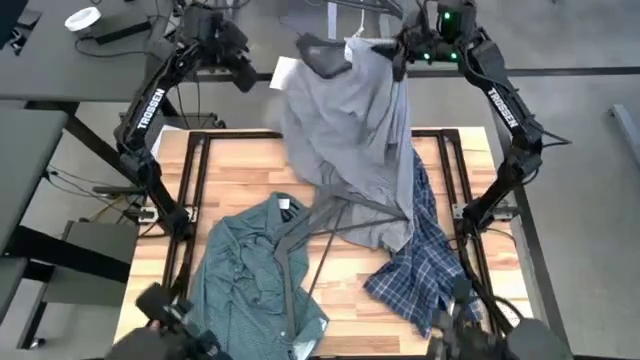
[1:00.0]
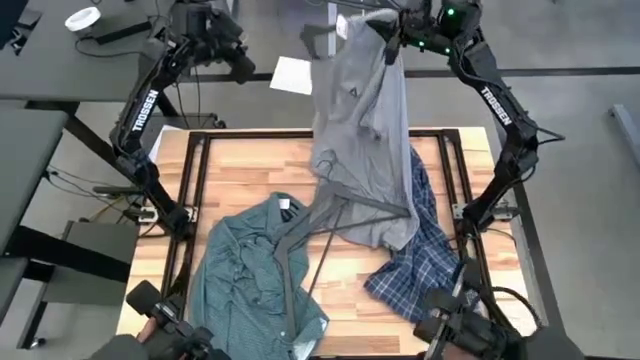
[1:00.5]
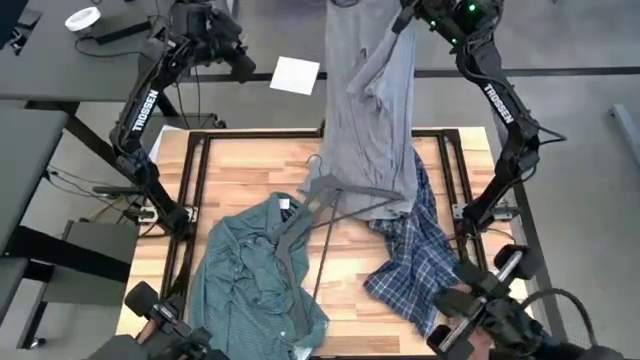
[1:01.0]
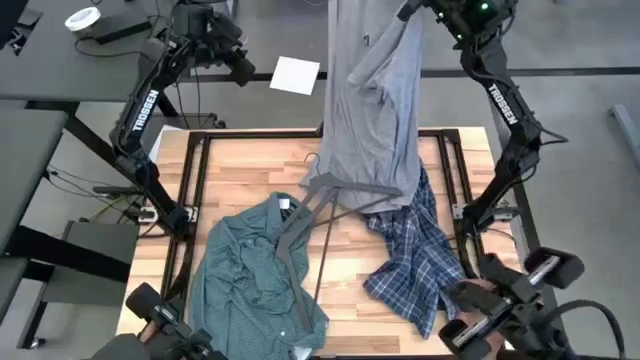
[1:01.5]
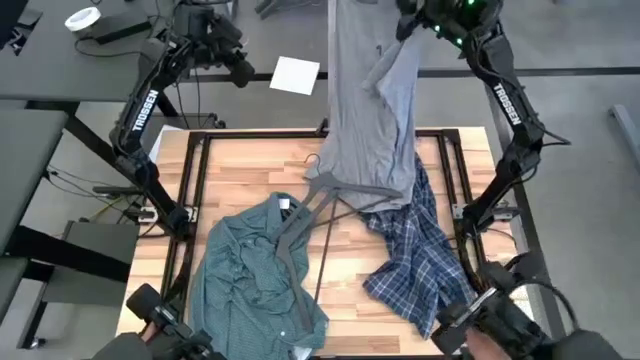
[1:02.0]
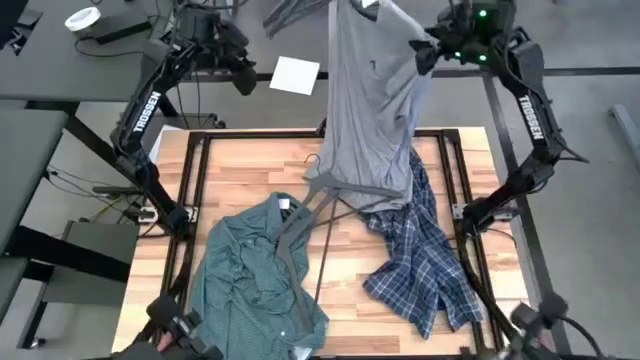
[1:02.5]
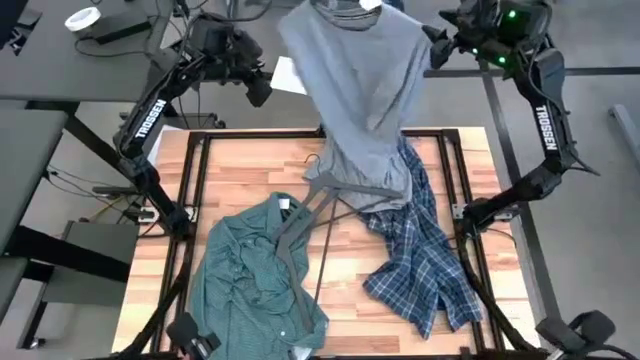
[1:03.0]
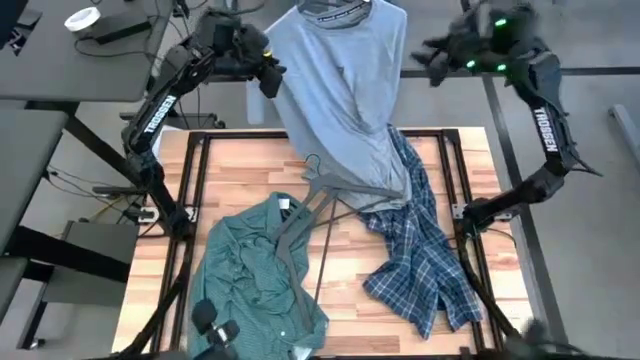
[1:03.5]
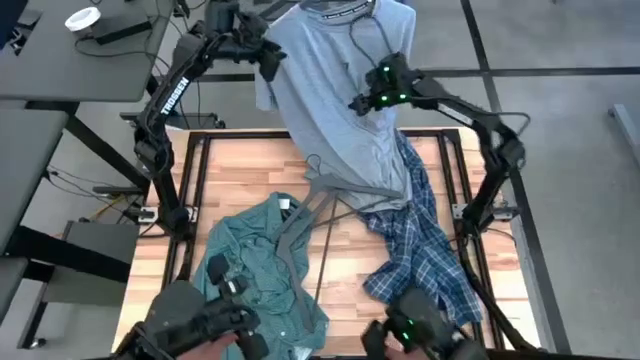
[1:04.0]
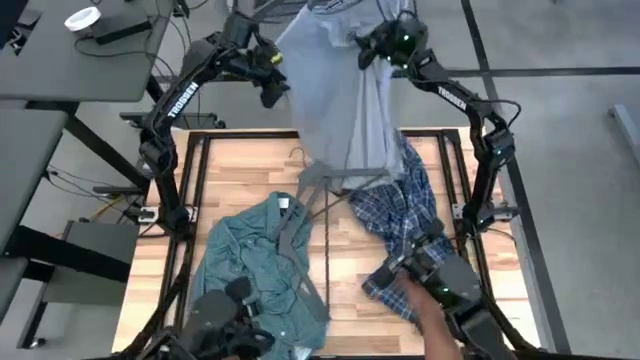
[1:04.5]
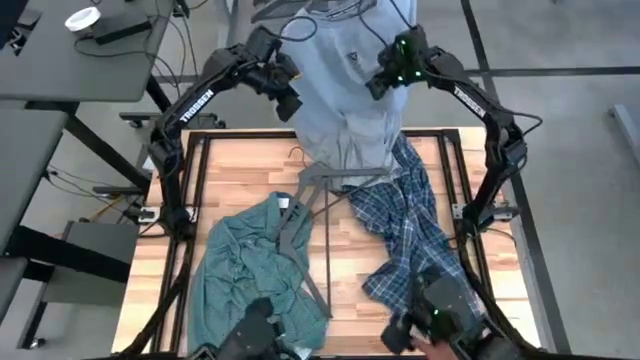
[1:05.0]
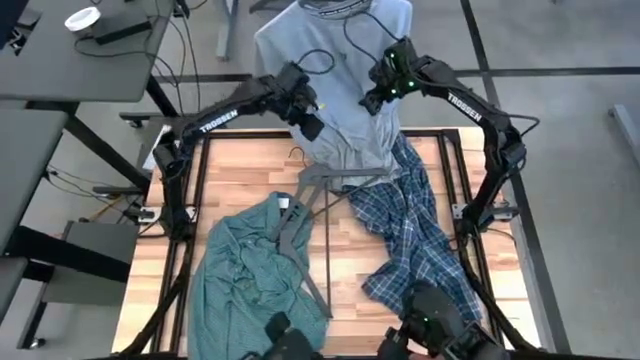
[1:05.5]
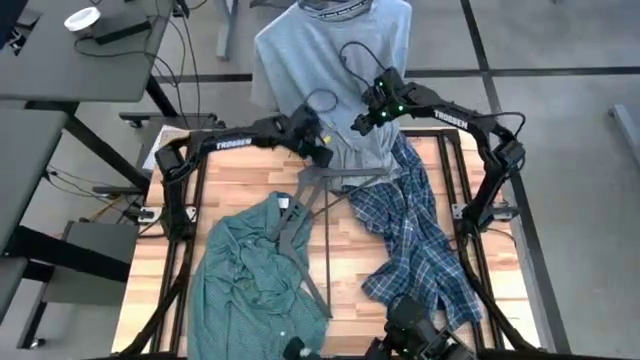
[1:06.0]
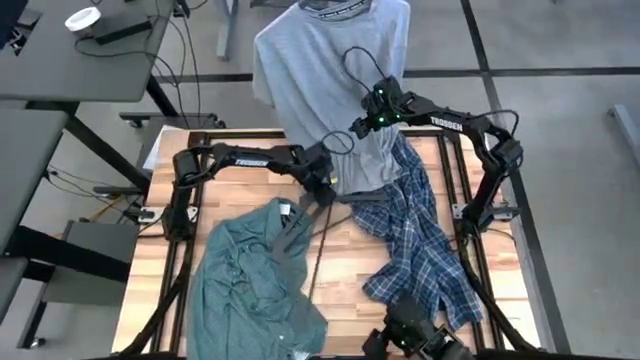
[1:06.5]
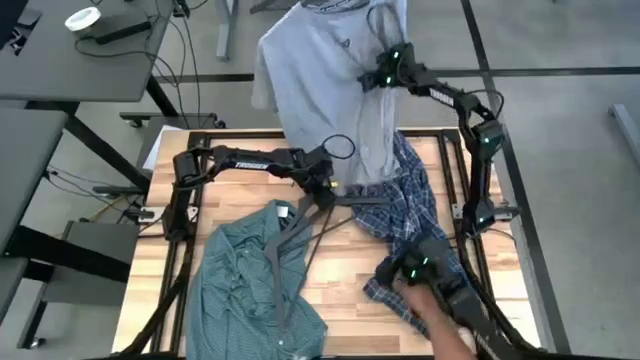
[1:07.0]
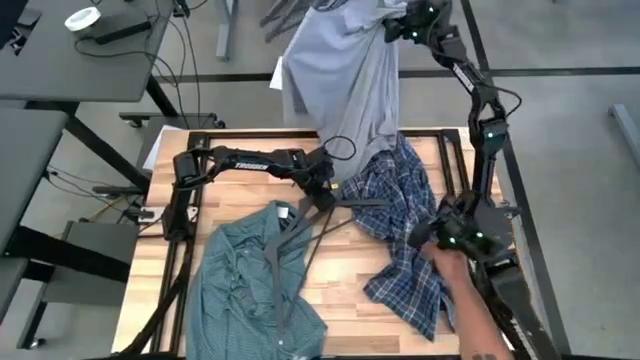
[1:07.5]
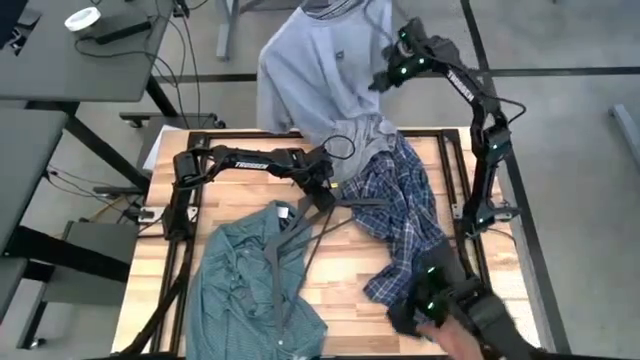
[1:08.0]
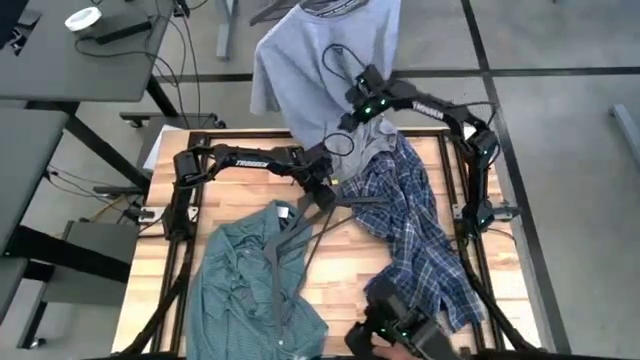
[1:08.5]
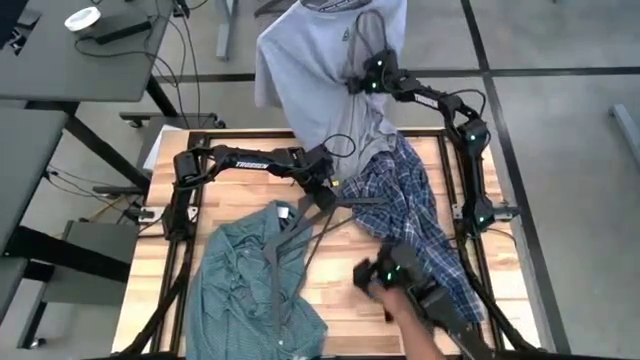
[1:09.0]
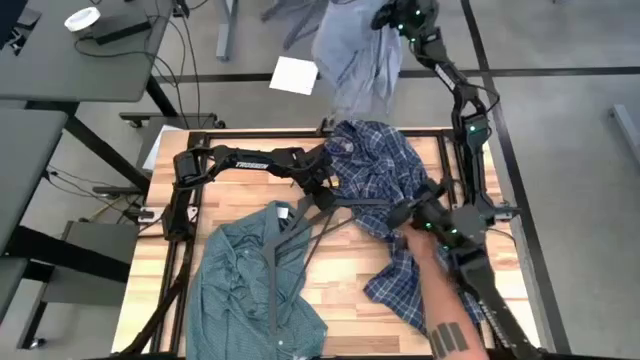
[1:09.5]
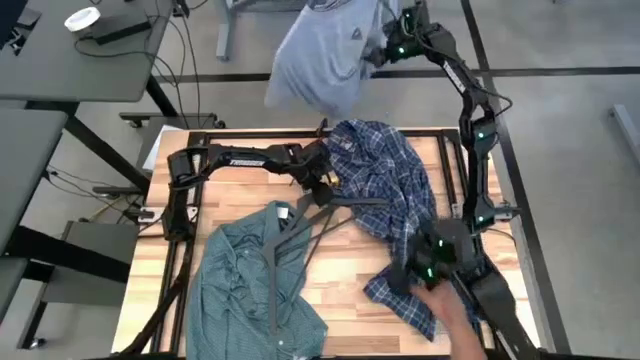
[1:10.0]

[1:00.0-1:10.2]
Task: Hang clothes
Hang the gray t-shirt on the hanger rack

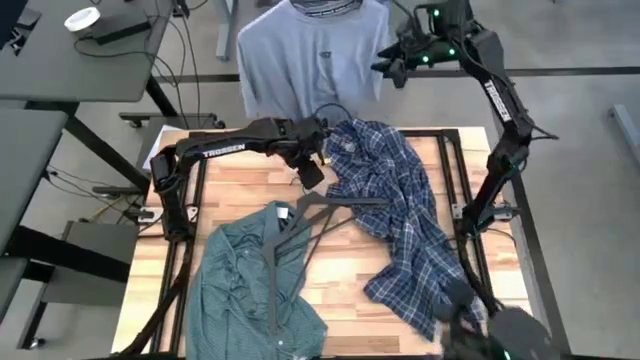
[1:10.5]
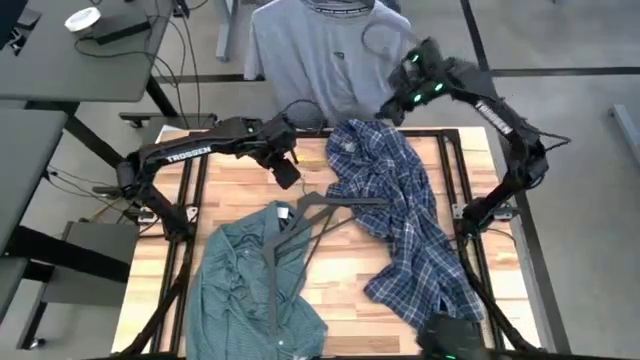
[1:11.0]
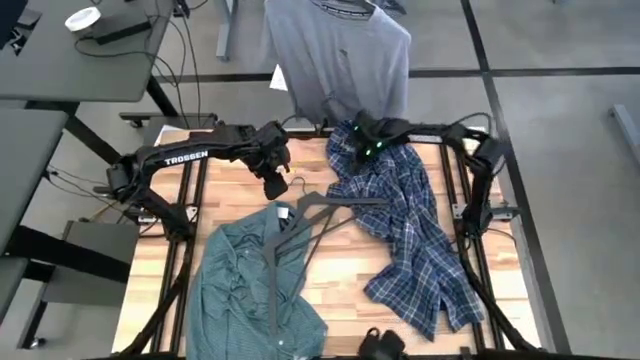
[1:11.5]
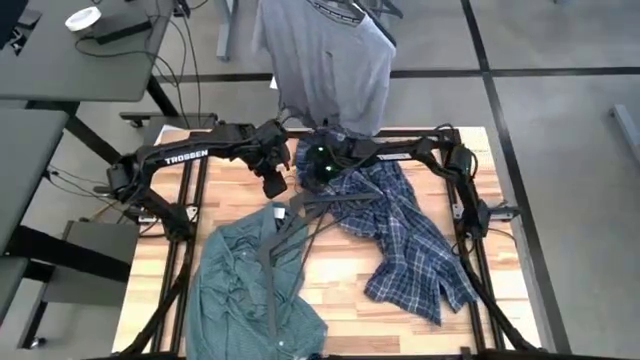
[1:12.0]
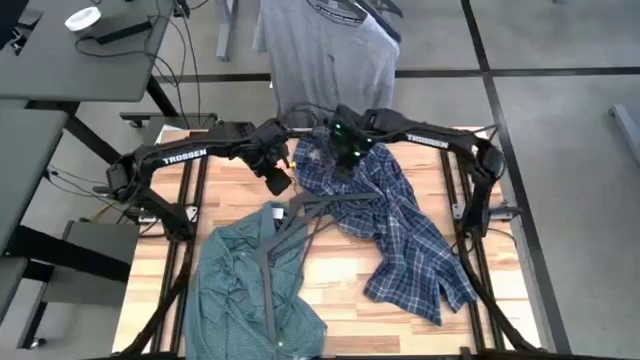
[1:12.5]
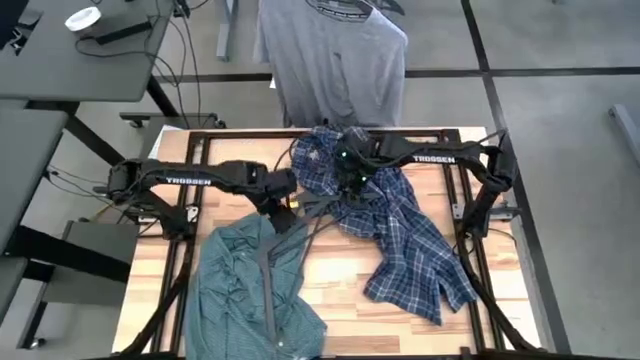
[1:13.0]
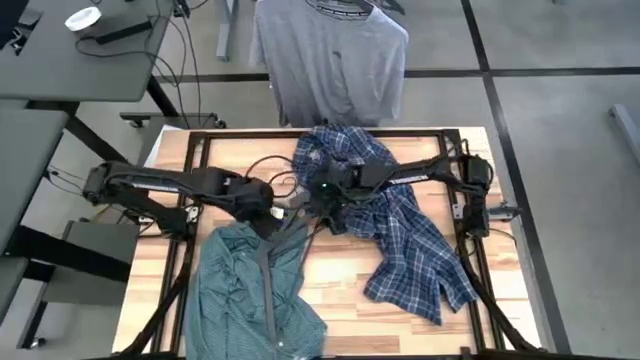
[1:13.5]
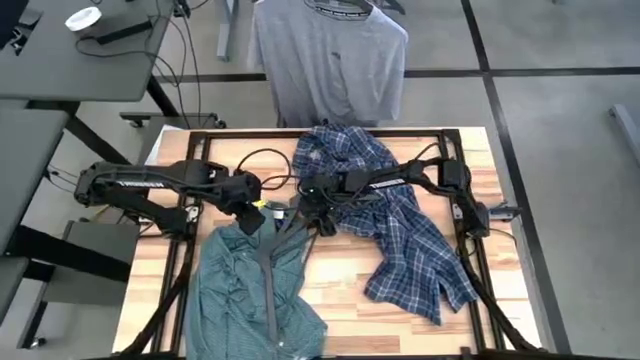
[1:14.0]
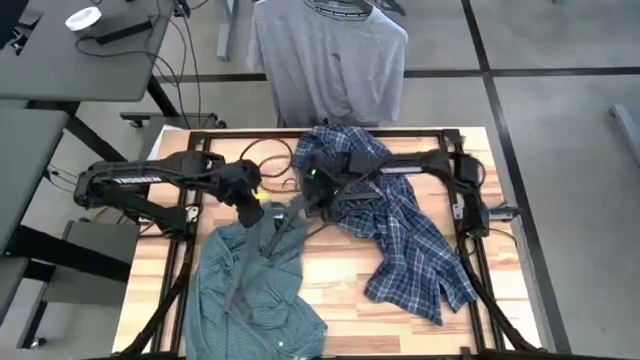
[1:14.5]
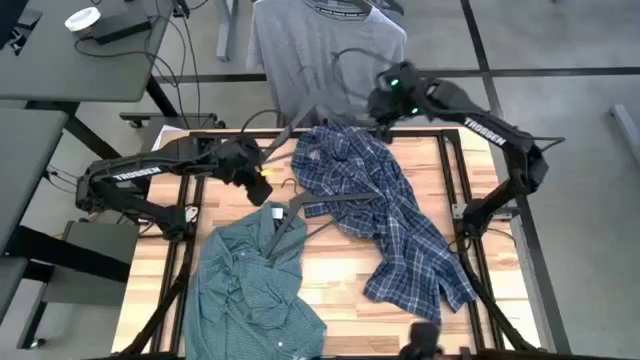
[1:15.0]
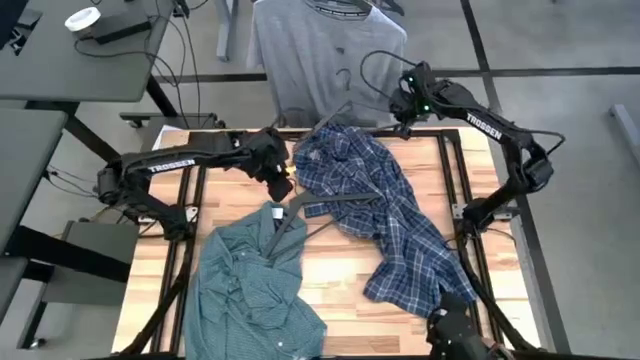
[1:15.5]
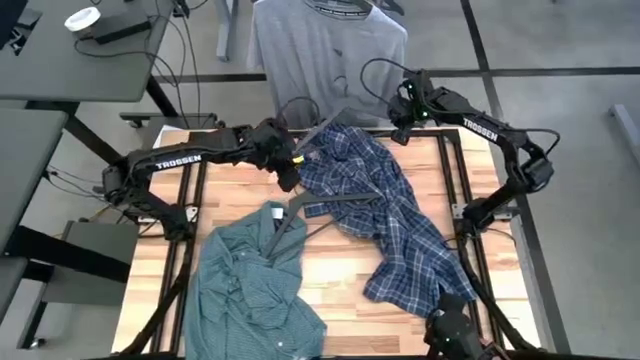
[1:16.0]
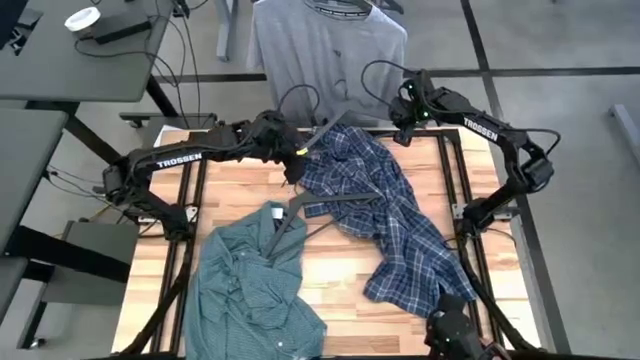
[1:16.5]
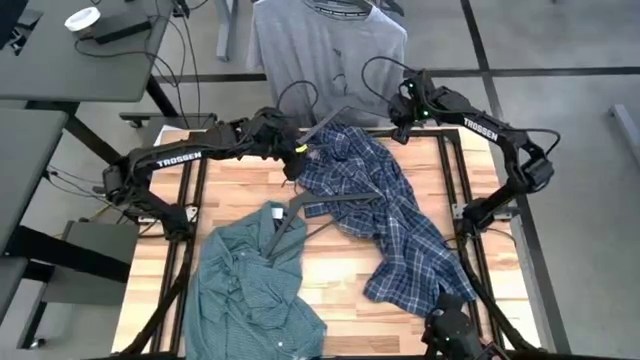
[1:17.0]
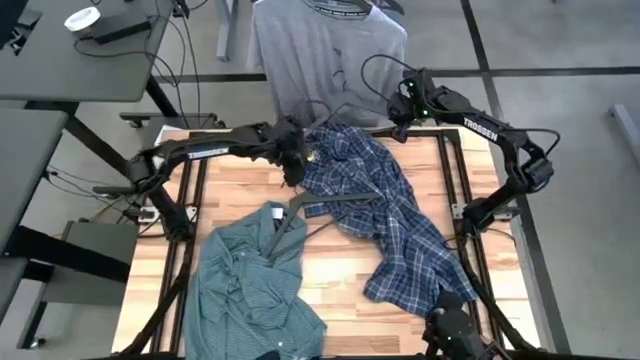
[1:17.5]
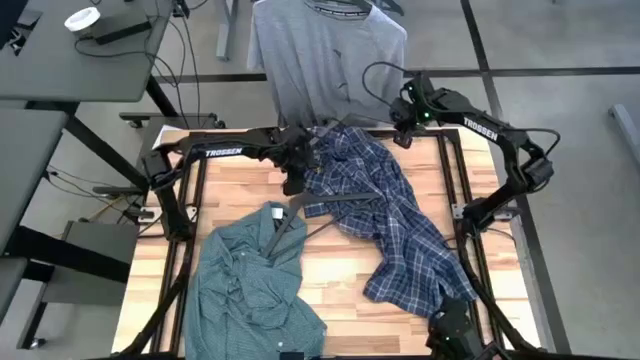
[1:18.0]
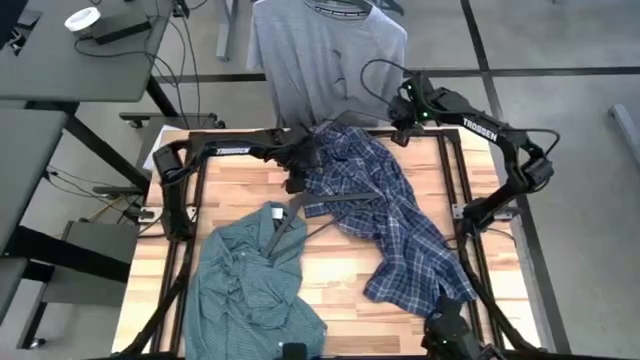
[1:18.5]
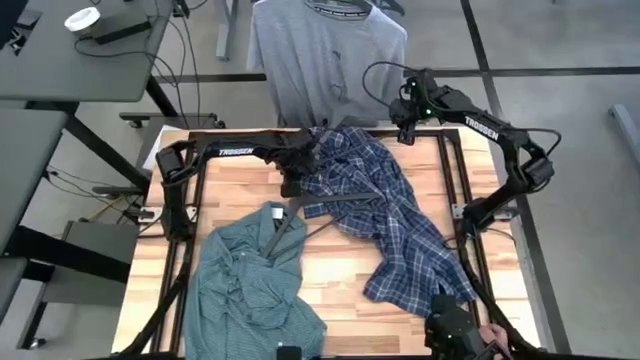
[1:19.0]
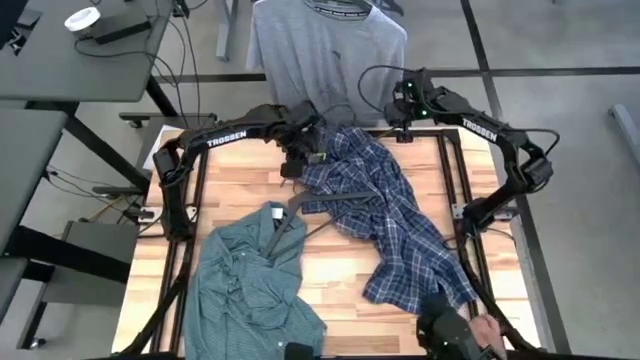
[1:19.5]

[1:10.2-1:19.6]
Put the blue polo shirt on the gray hanger
